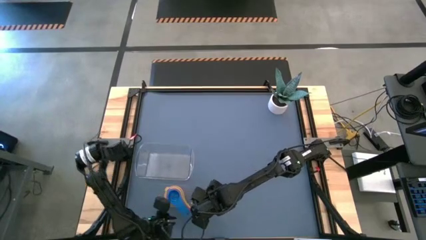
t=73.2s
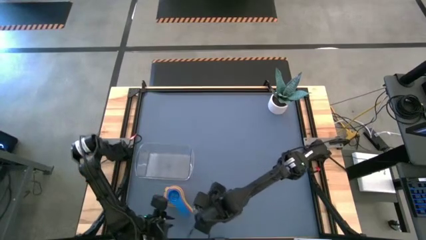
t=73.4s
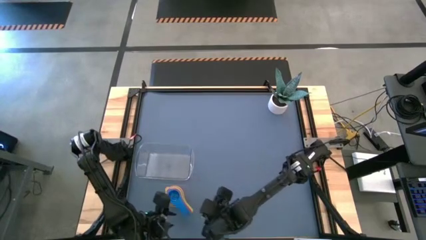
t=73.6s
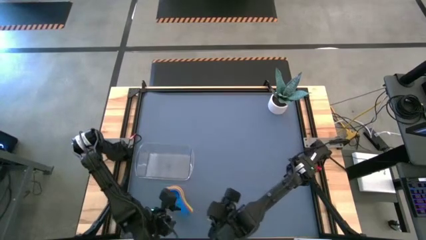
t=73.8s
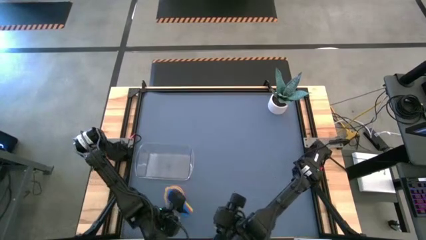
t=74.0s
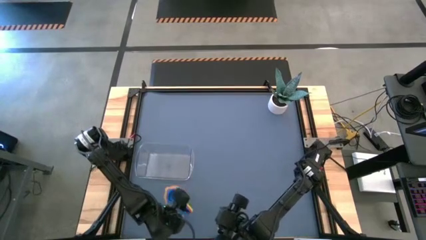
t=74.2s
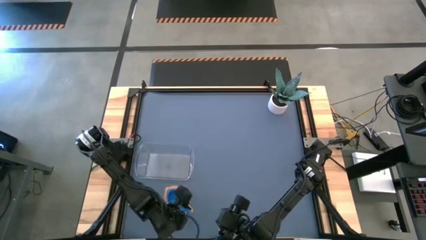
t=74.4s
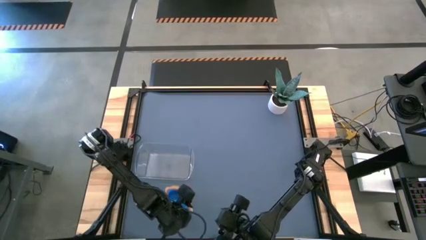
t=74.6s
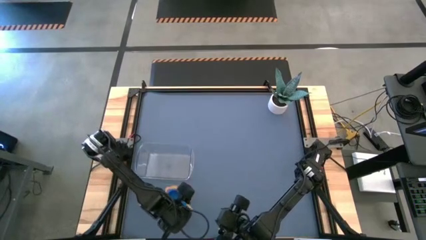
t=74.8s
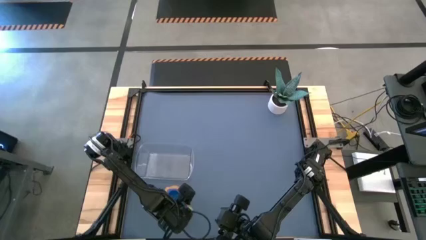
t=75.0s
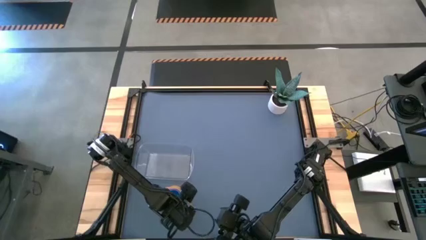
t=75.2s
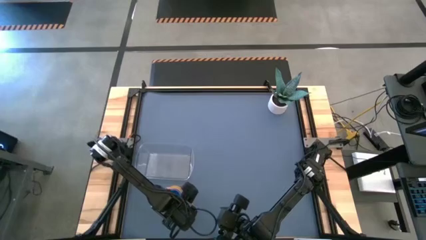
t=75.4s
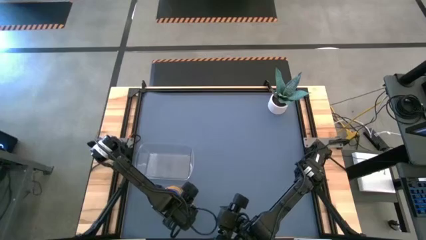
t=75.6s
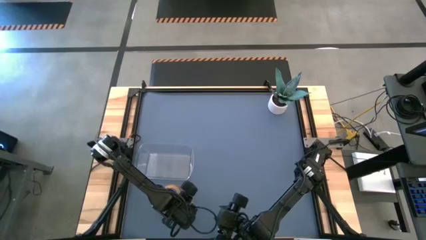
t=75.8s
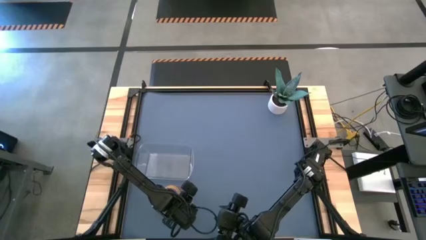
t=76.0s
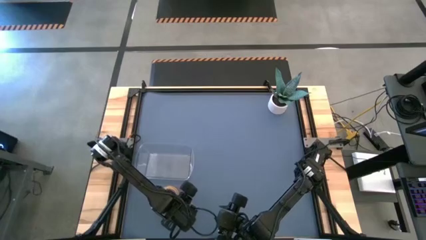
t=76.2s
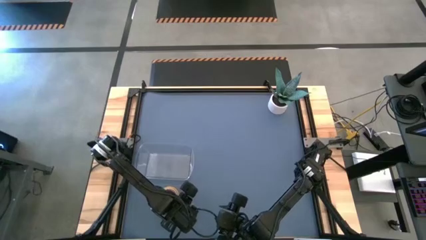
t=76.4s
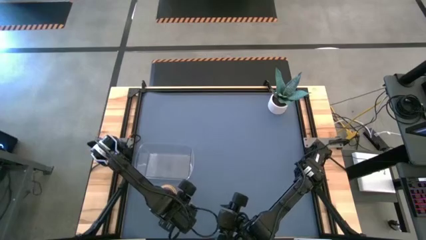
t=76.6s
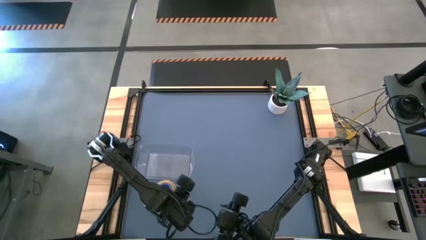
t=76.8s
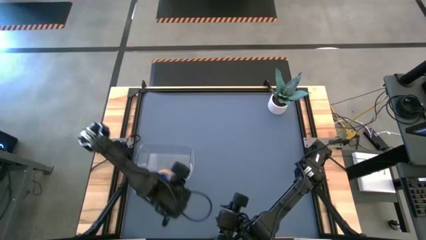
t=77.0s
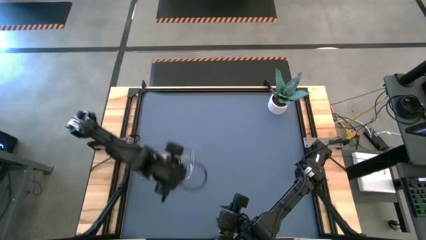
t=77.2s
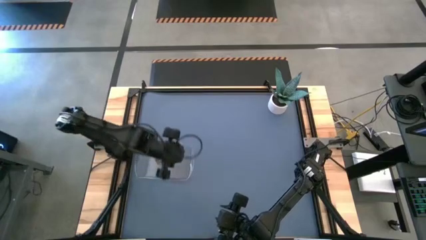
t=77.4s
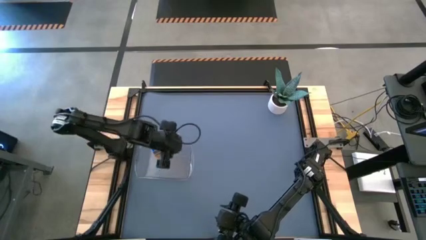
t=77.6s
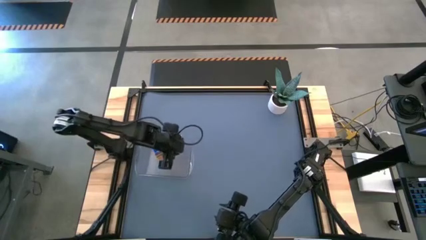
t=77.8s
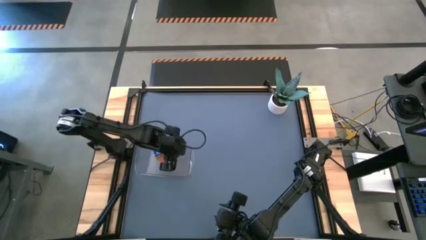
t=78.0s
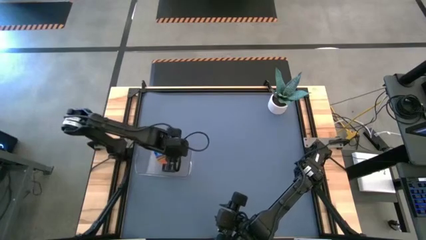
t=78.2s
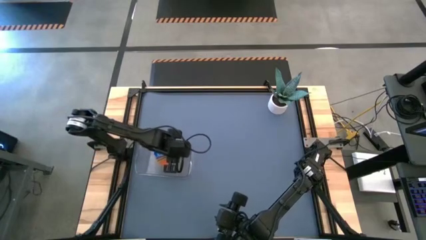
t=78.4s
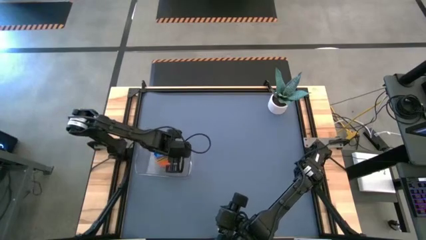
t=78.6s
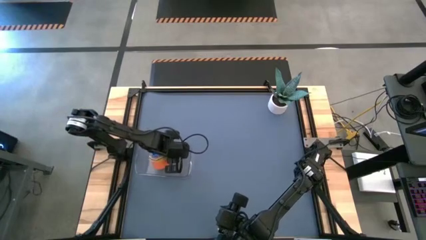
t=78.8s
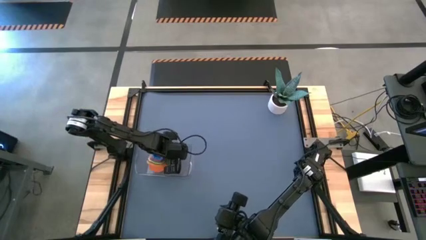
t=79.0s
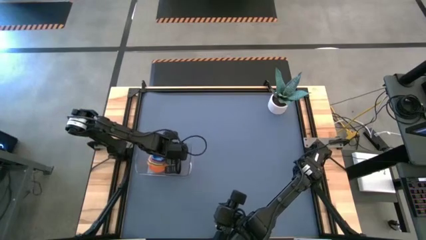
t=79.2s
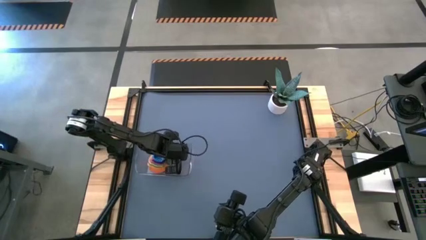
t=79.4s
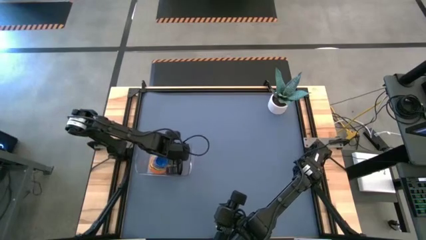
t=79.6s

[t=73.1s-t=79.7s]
Task: Nest measuring cups in basket
Put the stacked measuring cups into transparent bin

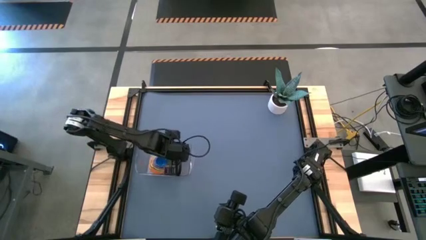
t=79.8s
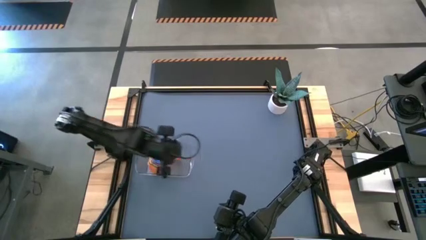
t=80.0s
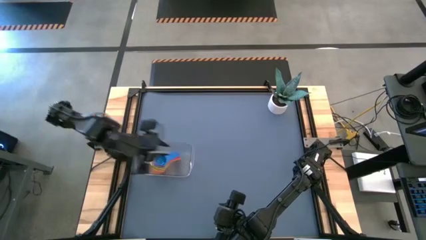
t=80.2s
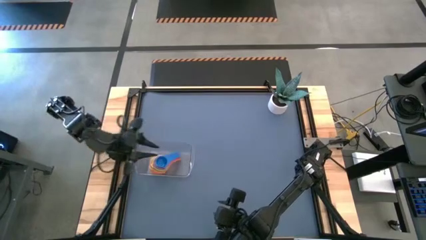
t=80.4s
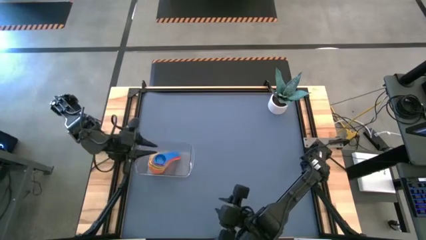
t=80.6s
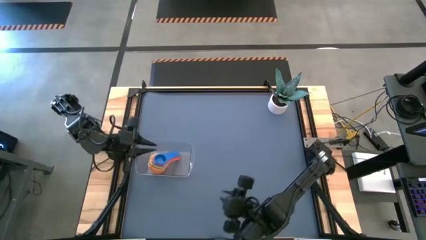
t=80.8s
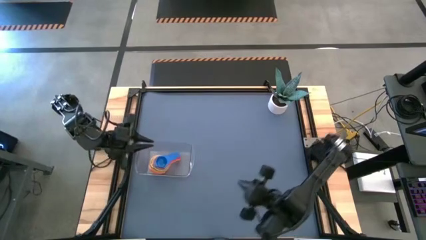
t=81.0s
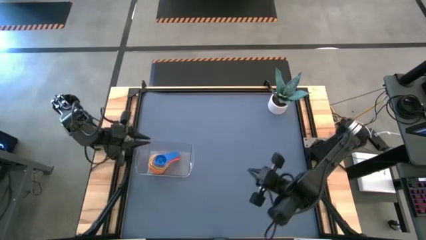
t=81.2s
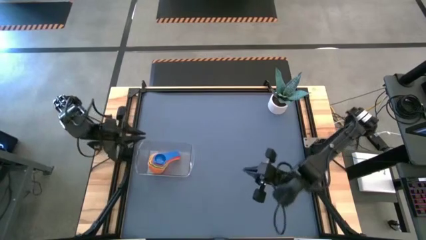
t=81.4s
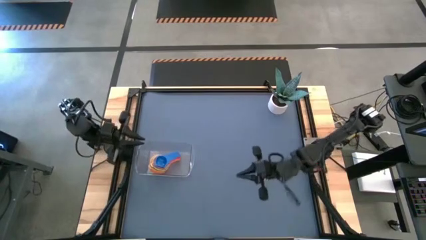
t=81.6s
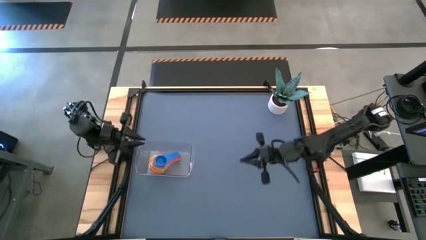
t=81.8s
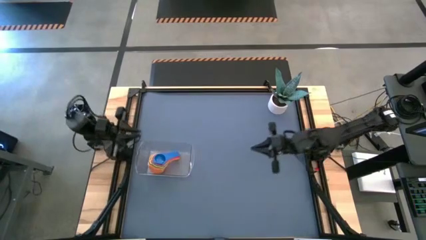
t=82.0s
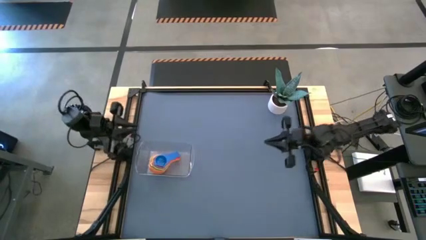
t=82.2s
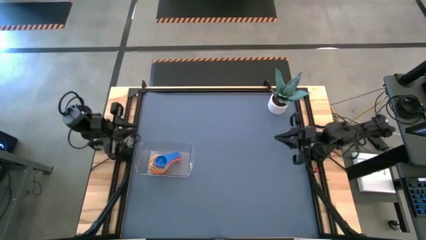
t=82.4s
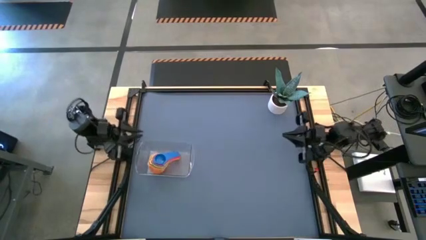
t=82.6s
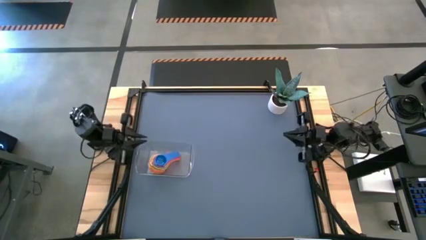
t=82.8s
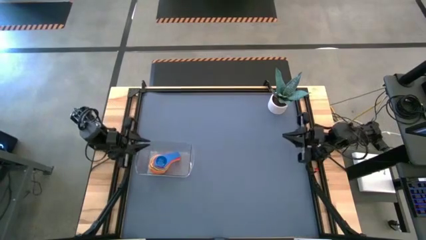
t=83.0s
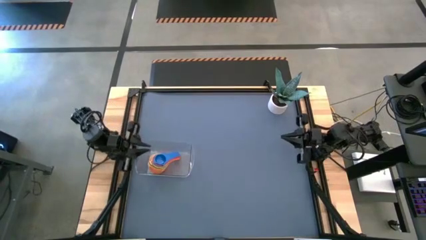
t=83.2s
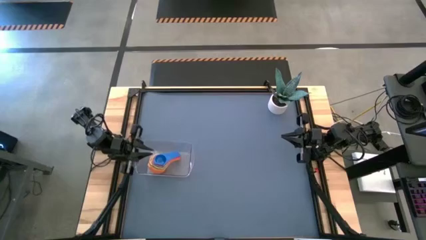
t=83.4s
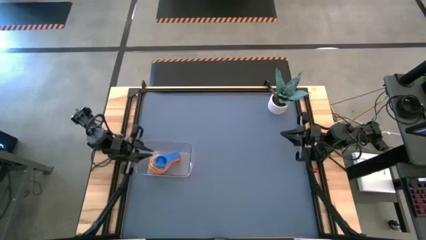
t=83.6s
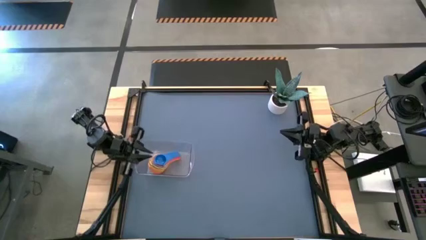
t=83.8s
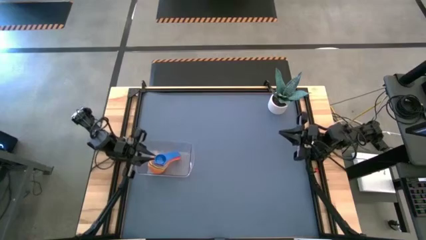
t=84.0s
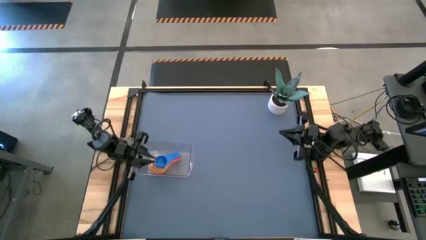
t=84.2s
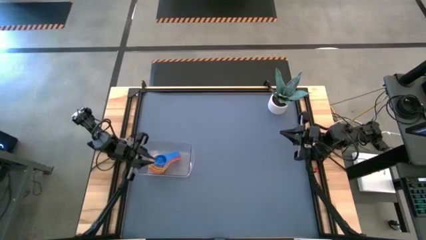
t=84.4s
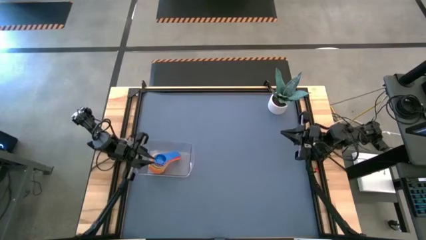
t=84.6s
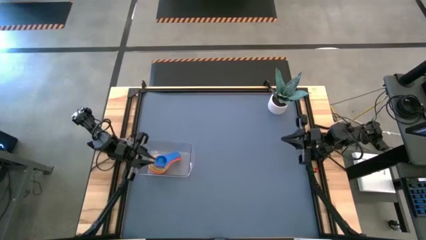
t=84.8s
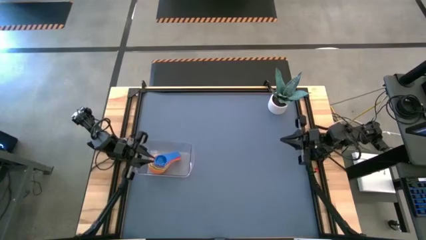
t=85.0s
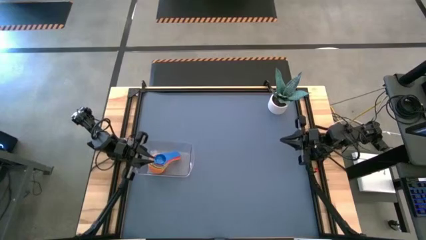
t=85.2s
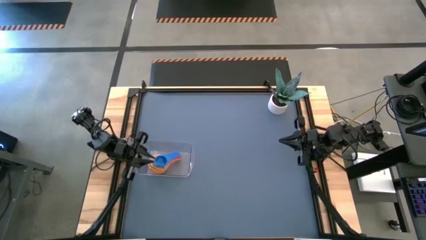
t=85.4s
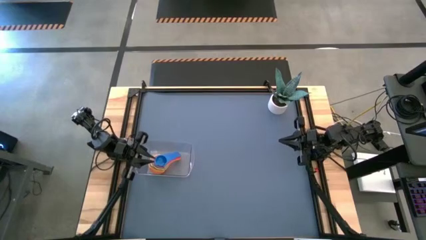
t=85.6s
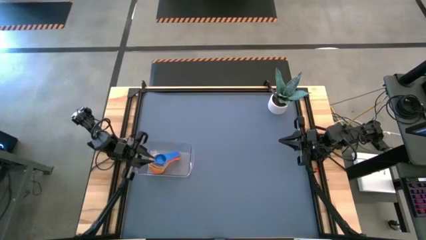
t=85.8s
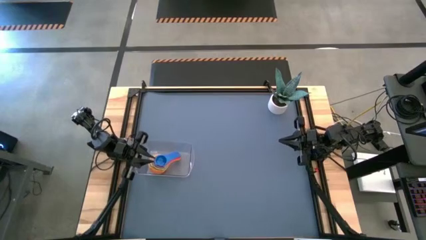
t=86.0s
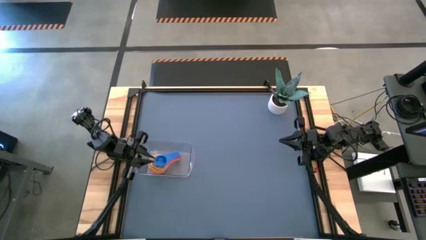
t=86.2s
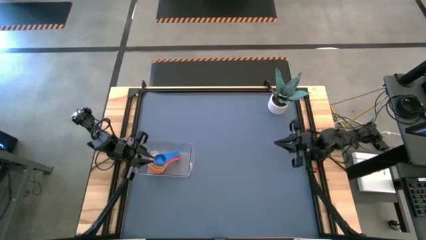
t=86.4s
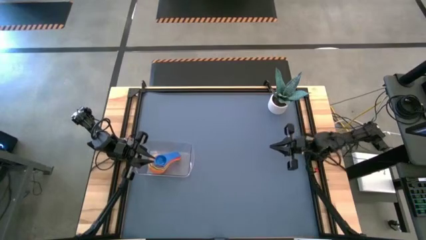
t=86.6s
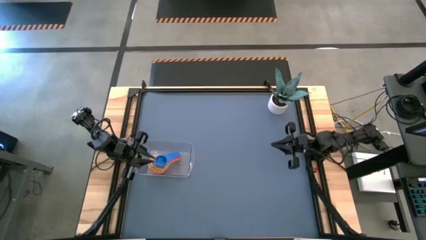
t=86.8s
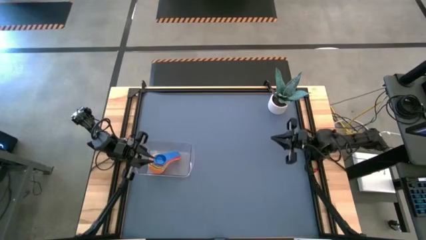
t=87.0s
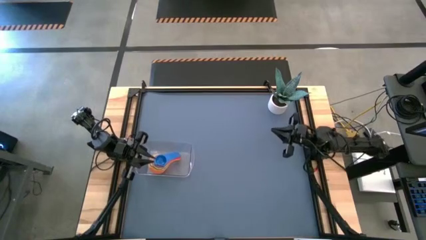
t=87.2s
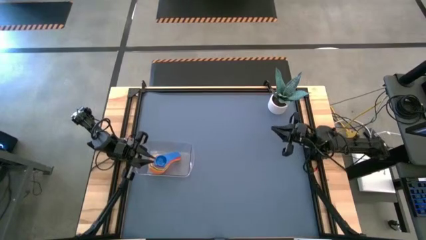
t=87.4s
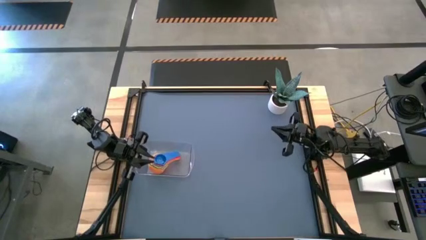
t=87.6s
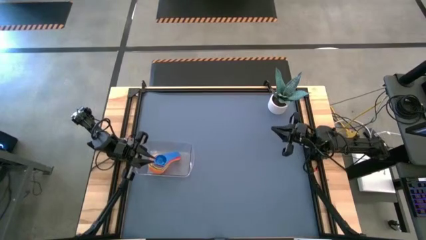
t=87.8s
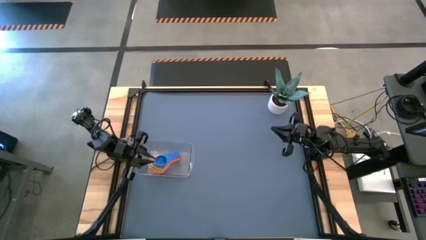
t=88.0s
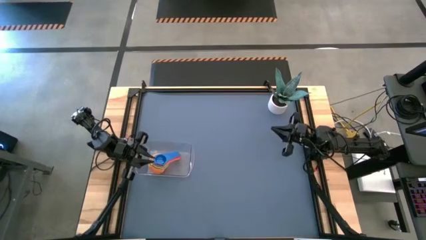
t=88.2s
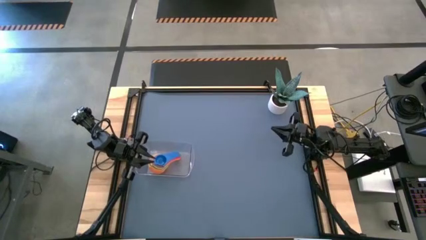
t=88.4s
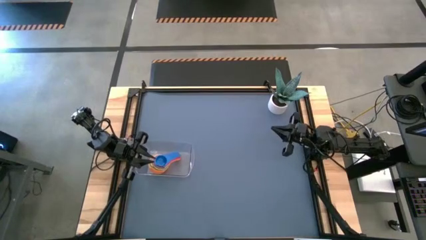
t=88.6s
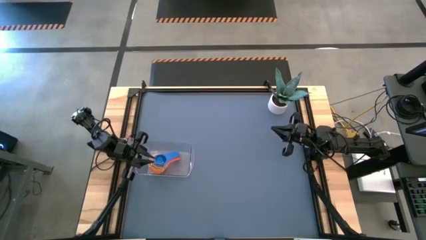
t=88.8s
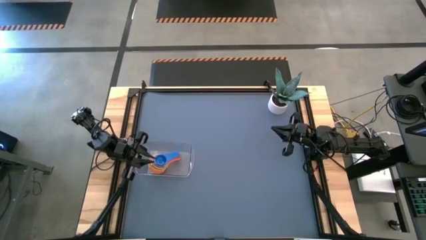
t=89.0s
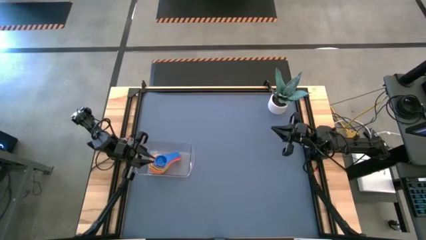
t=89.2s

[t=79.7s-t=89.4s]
Return to Home Position

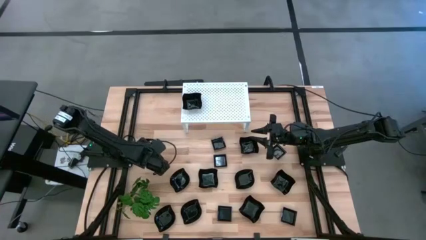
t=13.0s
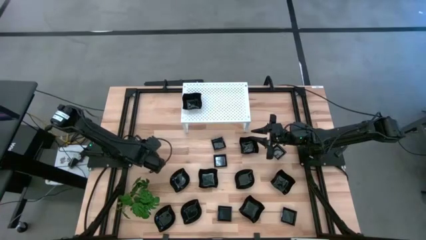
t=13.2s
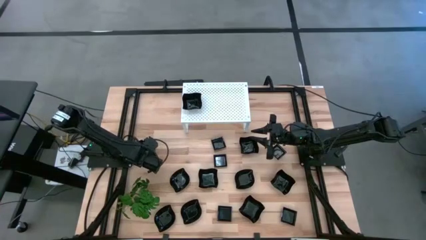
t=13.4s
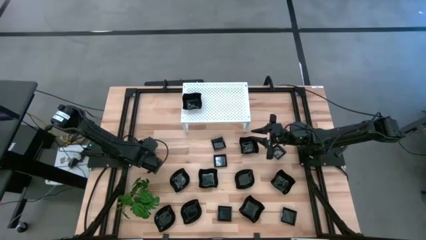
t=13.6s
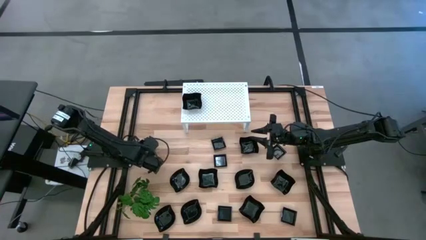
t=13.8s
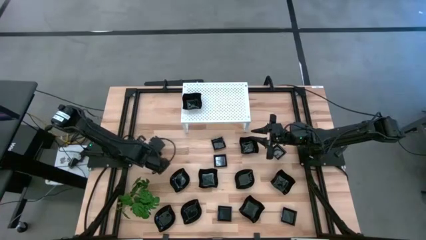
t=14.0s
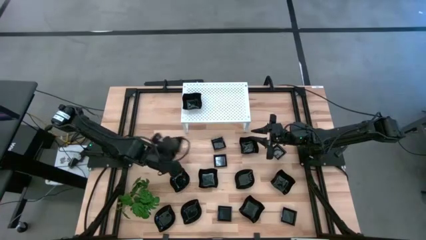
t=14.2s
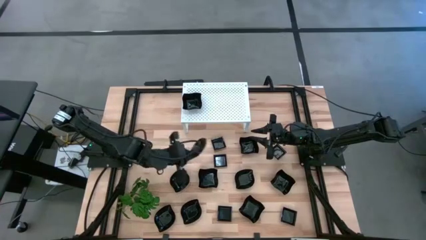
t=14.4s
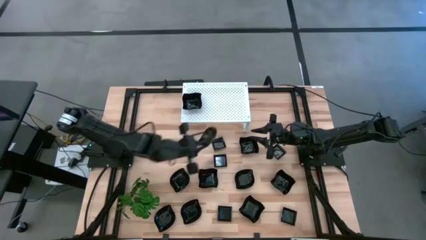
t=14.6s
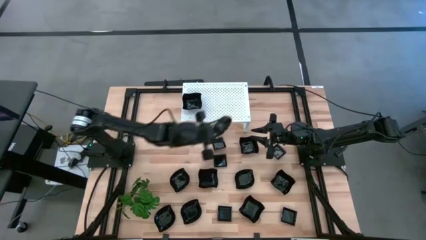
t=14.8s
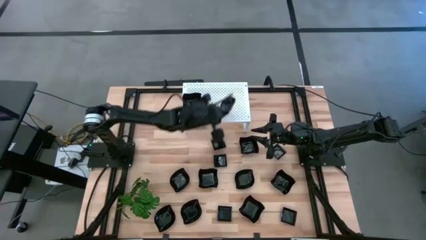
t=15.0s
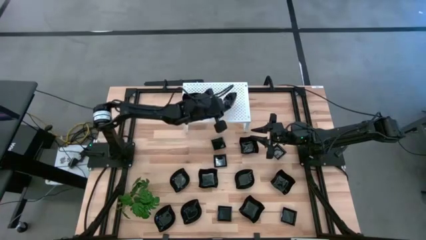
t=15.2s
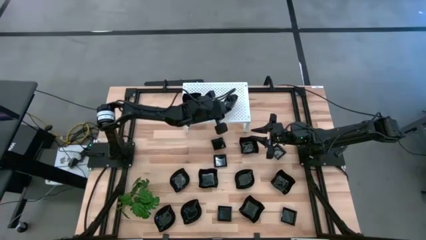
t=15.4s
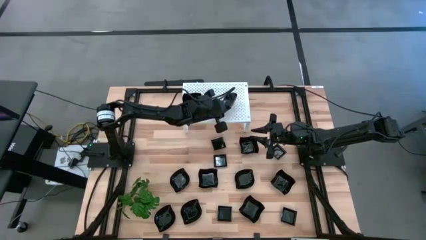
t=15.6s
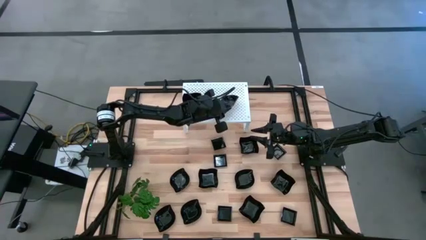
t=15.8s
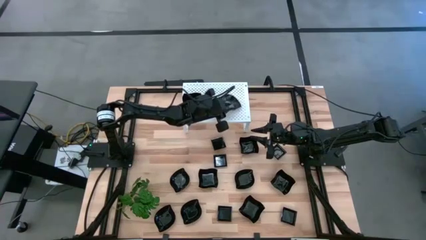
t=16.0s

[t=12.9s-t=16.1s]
Task: Pick & Place Mini shaped plates
Put the leaf shaped plate on the shelf
